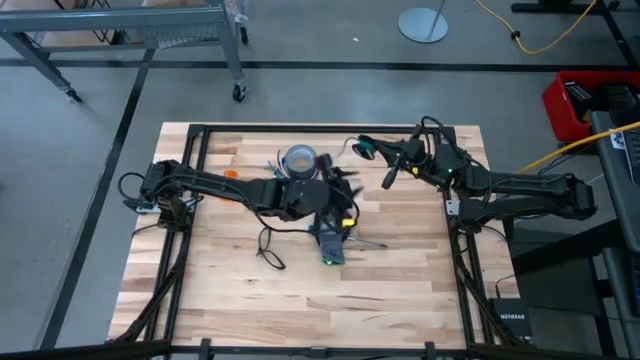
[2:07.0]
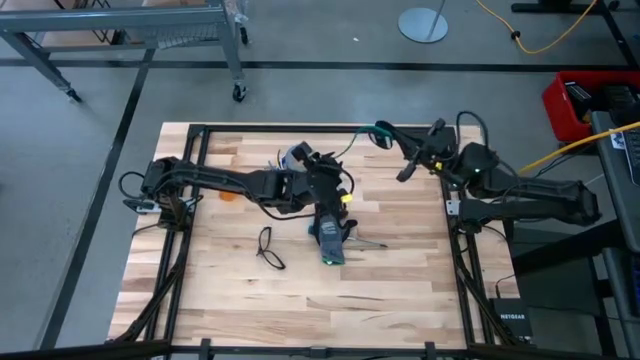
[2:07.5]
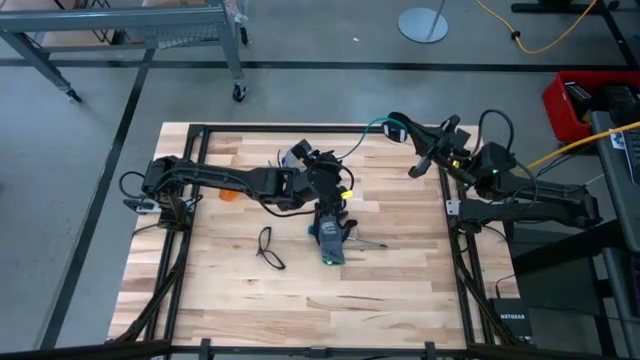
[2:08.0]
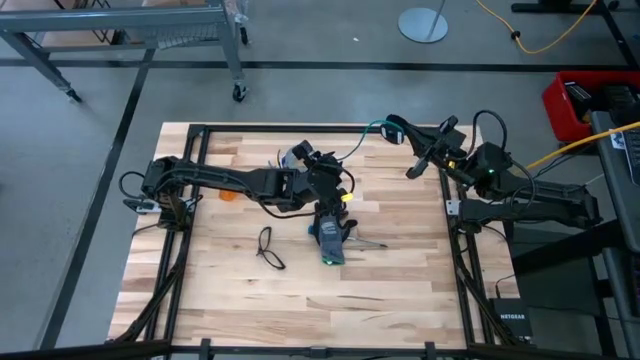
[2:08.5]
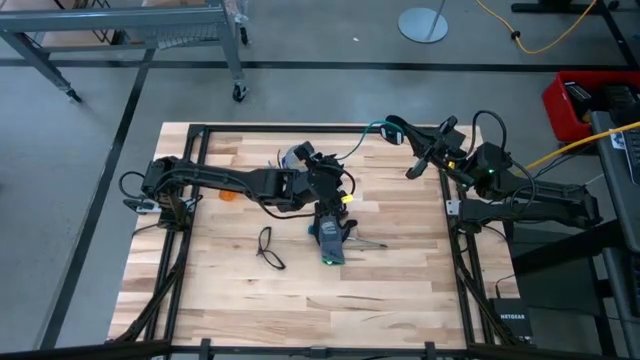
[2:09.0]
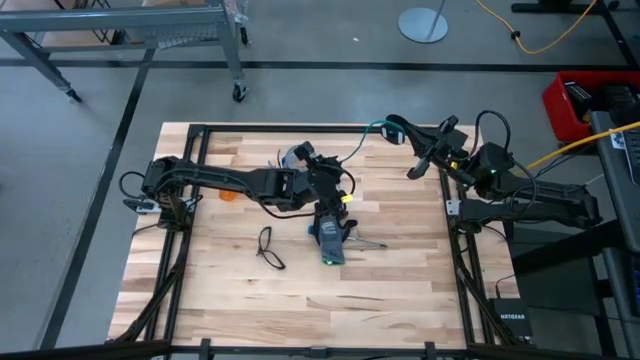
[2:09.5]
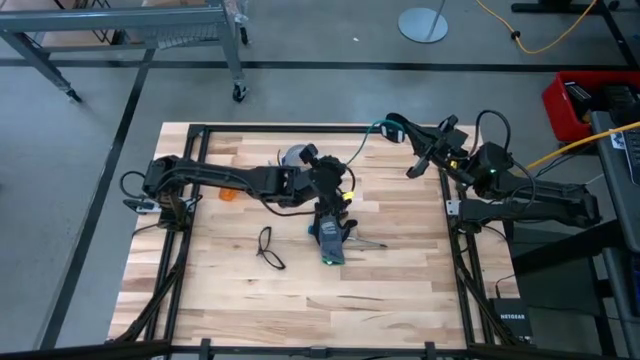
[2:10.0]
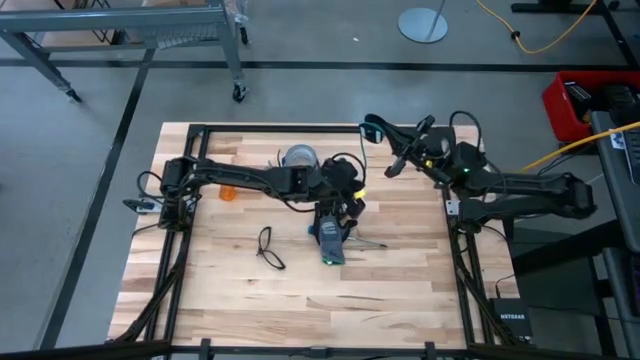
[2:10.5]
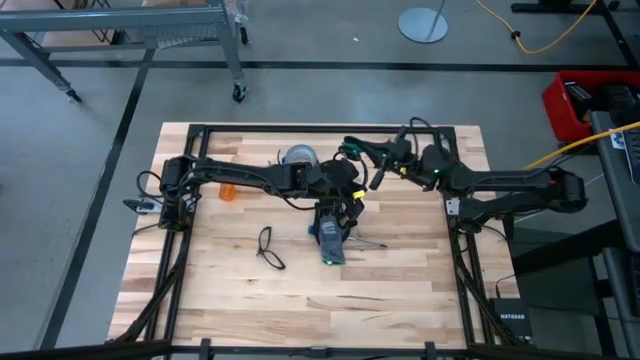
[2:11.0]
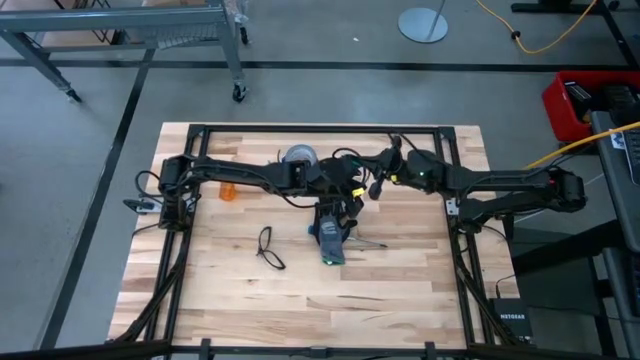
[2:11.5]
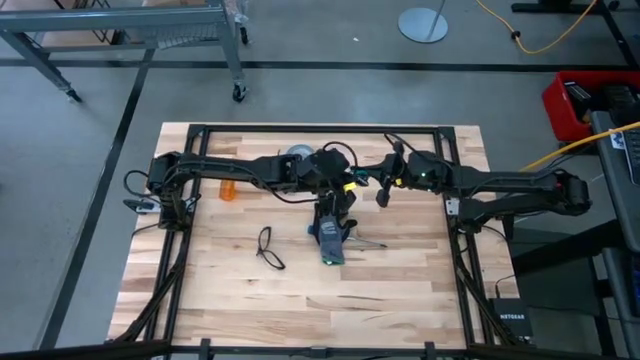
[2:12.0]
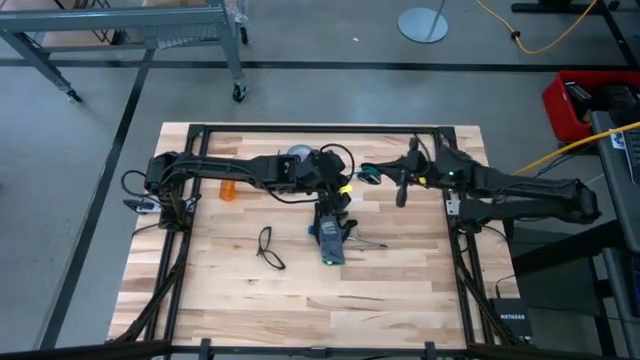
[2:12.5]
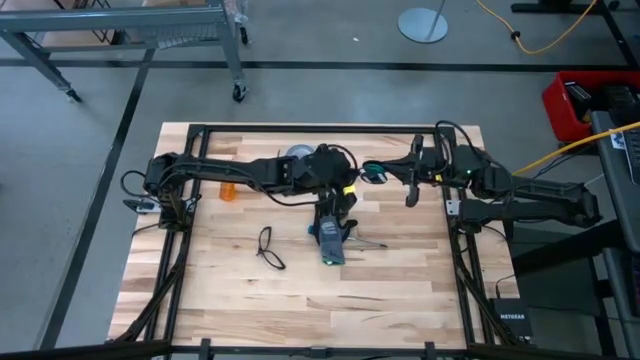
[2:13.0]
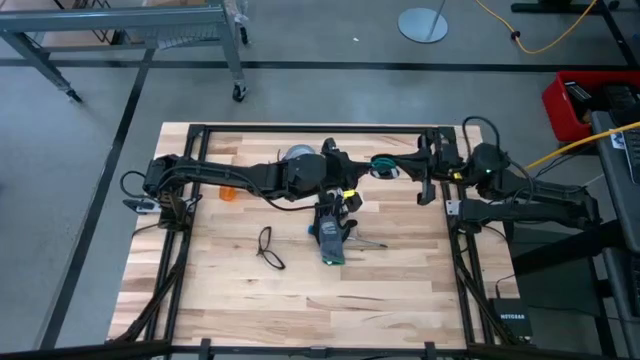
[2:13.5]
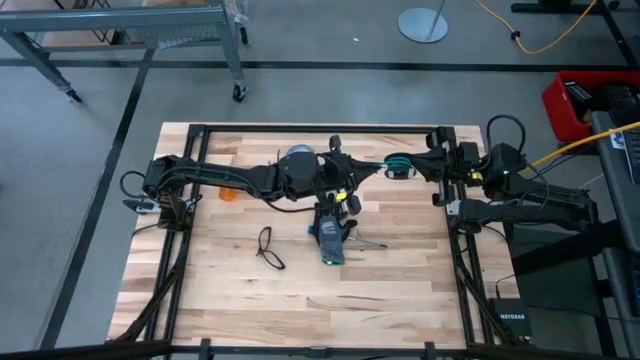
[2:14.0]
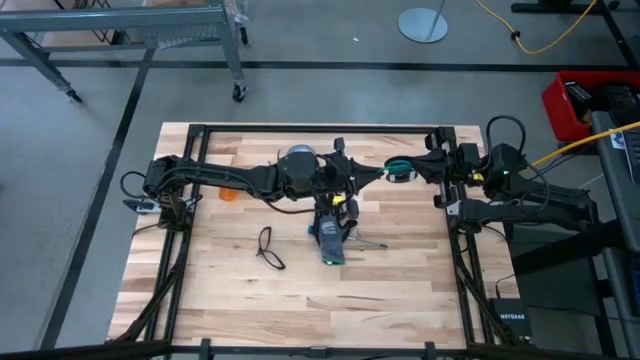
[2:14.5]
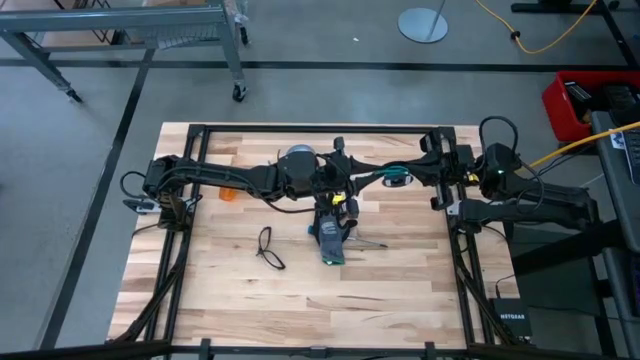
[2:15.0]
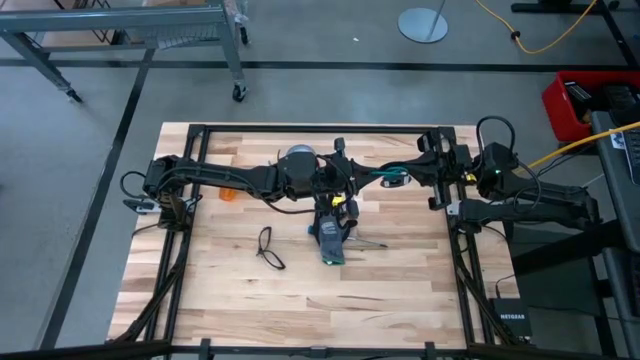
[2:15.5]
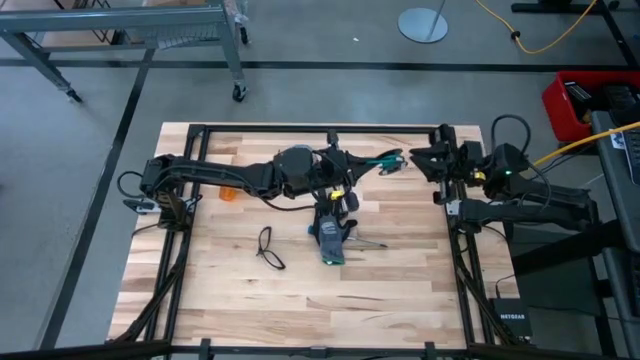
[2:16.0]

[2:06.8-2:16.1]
Task: Coil cords
Coil the green wire on the black spool

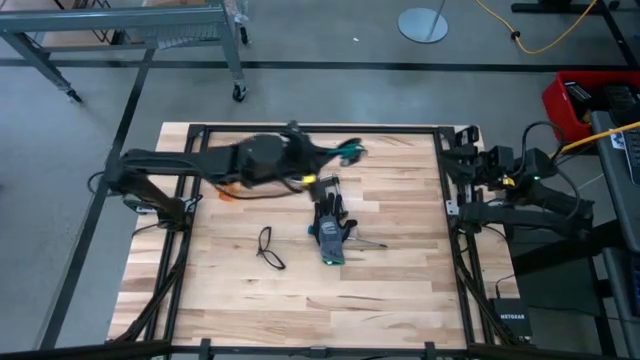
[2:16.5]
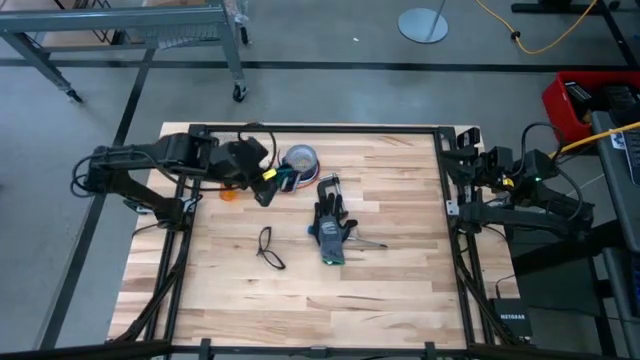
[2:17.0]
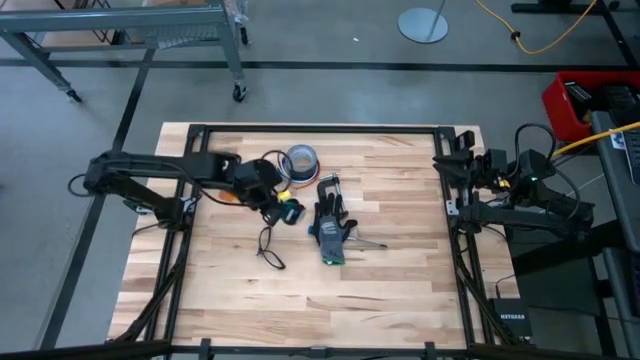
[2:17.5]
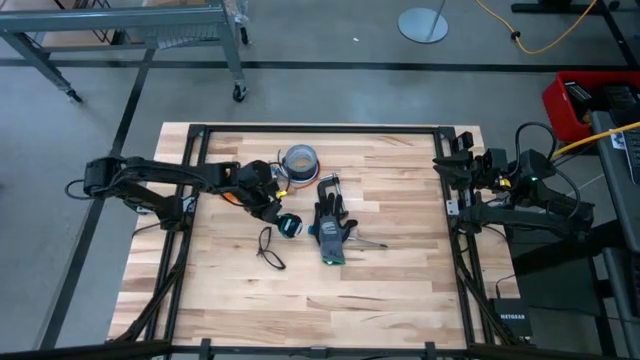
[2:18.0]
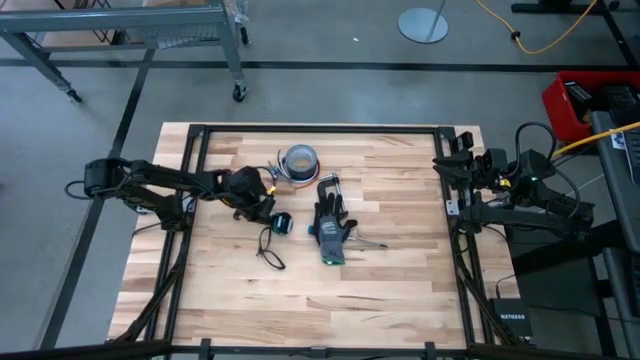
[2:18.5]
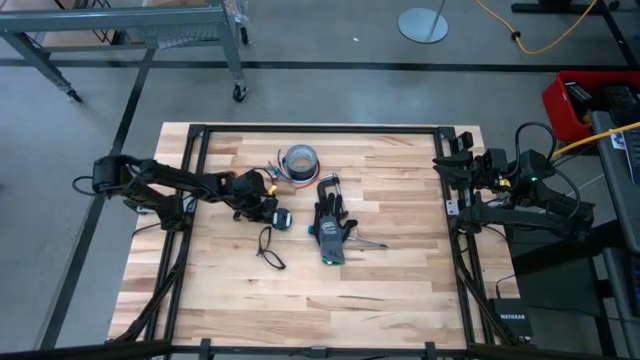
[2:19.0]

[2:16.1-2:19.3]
Coil the green wire on the black spool

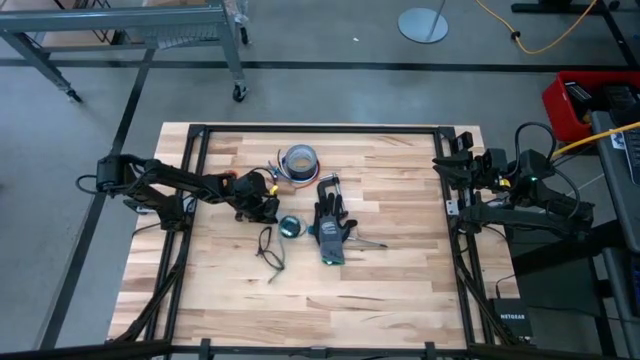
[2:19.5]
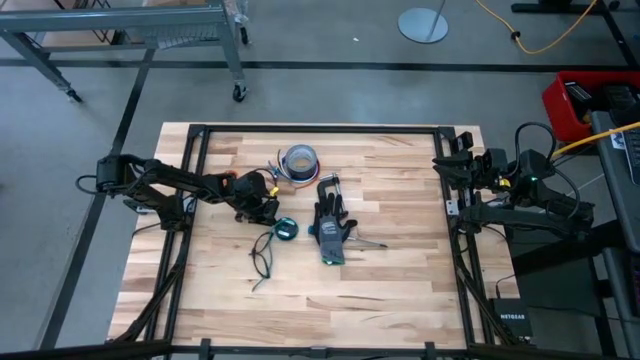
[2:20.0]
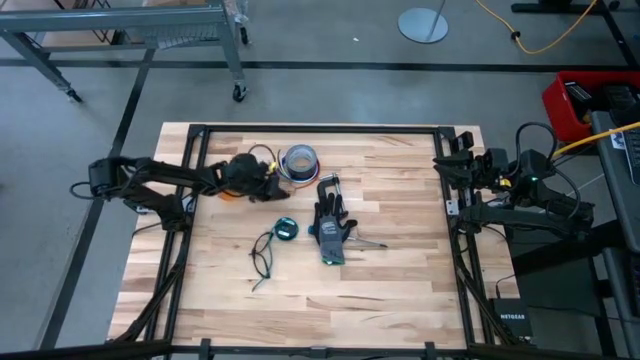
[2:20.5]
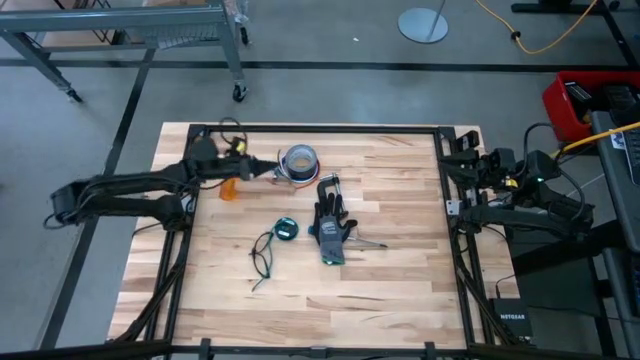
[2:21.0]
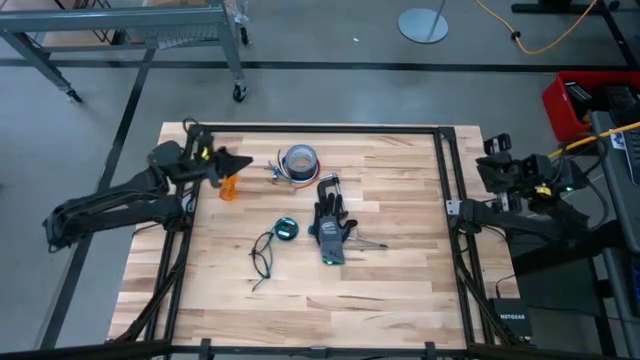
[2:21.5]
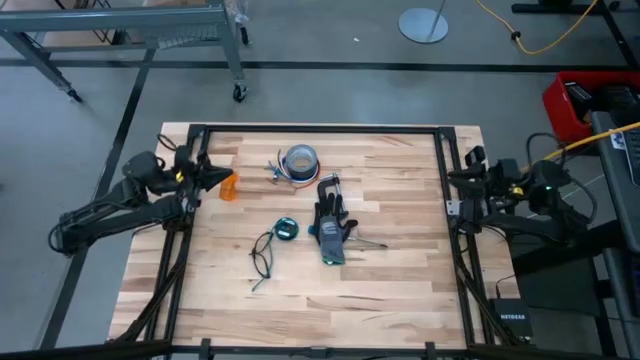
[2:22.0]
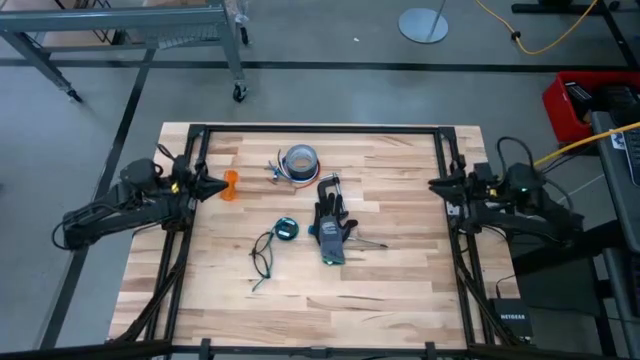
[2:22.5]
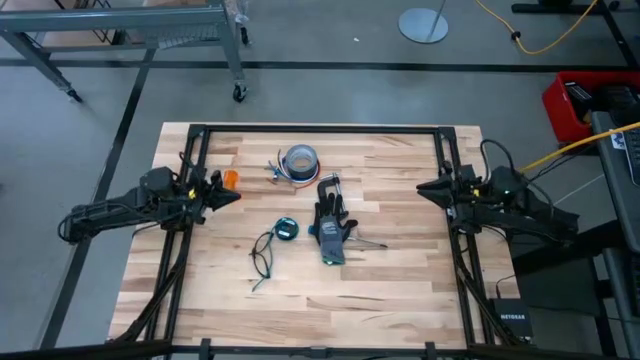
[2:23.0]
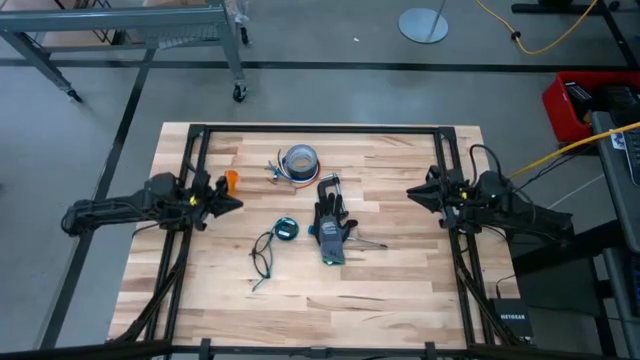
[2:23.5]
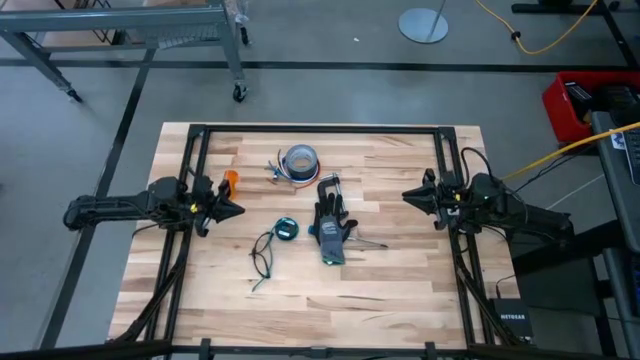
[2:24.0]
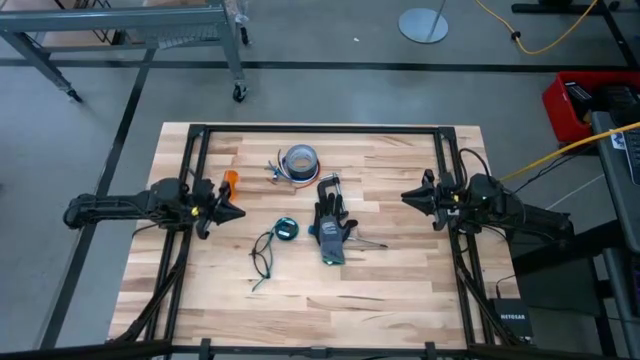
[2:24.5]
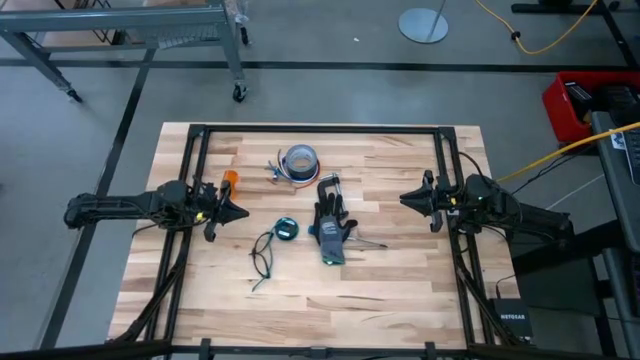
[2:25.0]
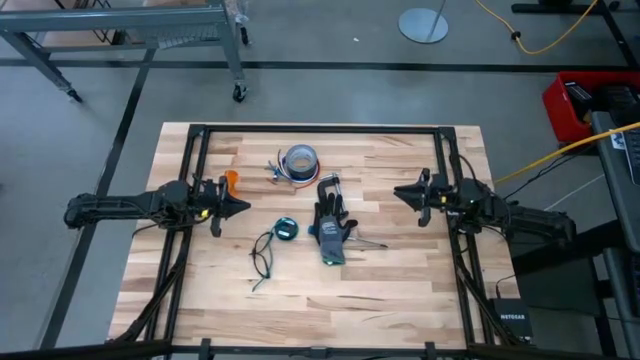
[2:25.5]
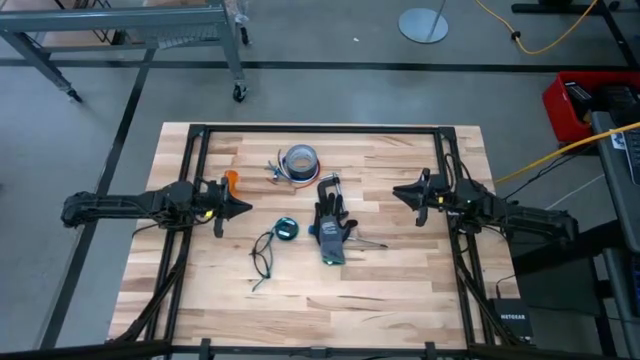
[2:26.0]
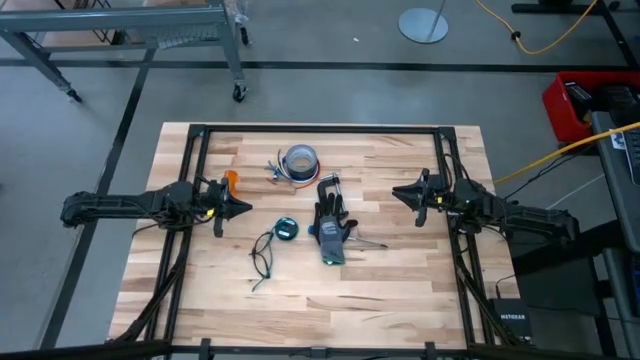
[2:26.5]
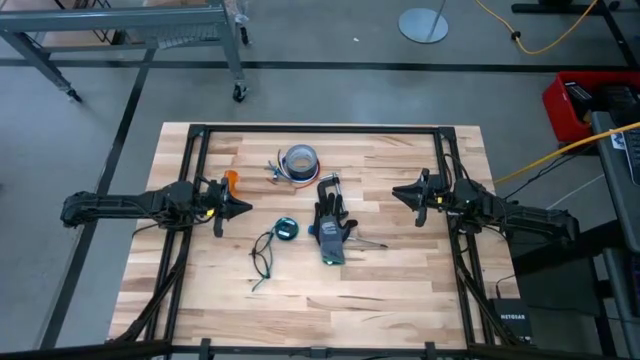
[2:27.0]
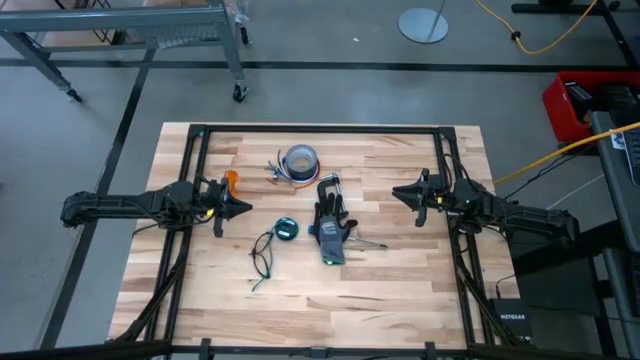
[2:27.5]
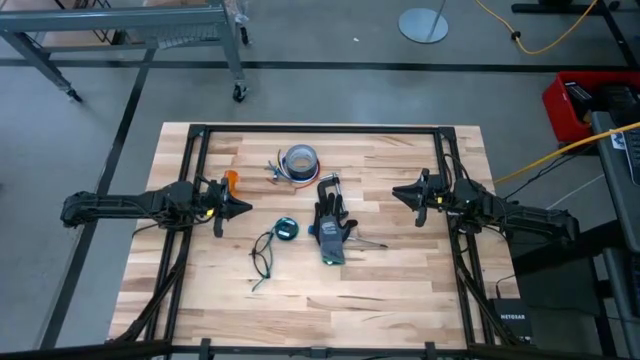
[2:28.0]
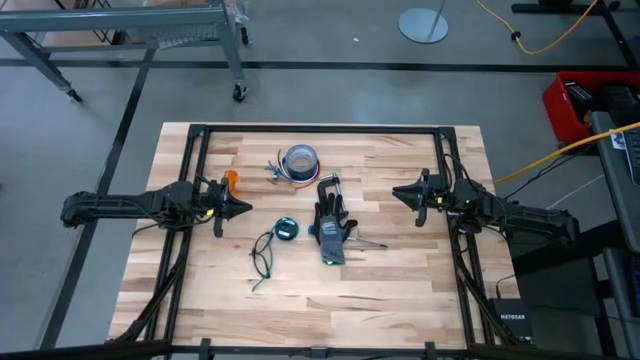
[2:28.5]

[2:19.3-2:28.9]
Return to Home Position
